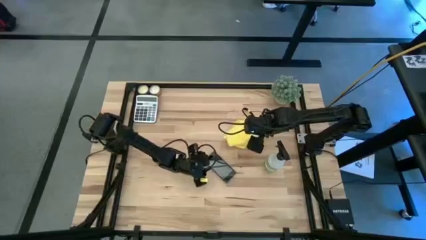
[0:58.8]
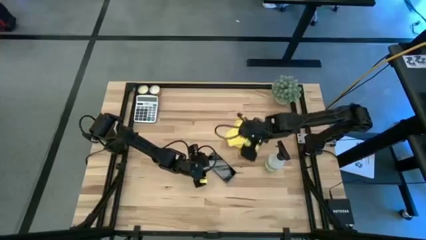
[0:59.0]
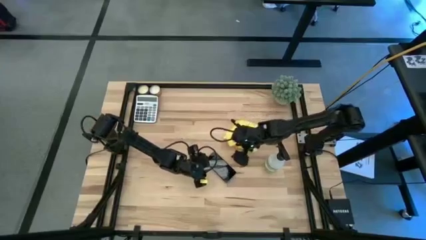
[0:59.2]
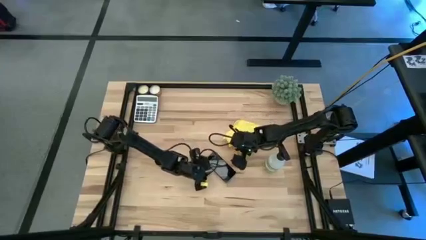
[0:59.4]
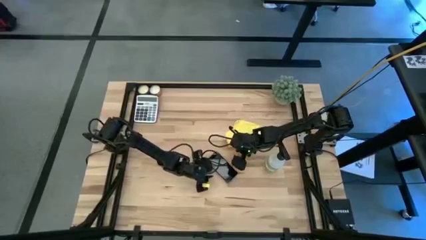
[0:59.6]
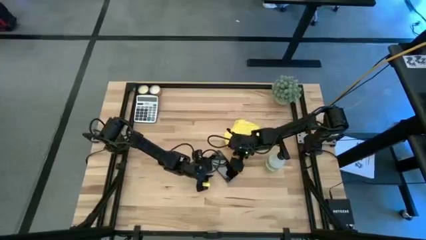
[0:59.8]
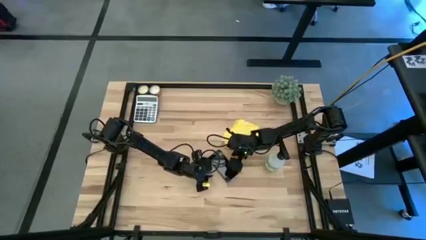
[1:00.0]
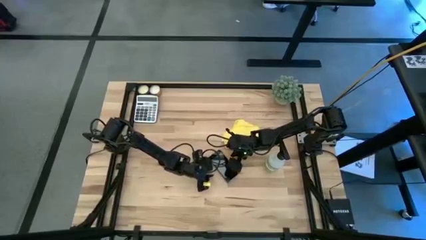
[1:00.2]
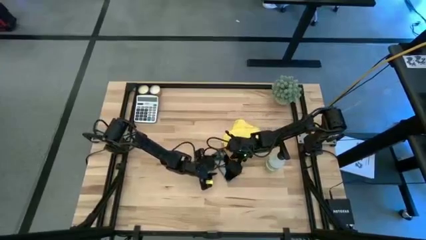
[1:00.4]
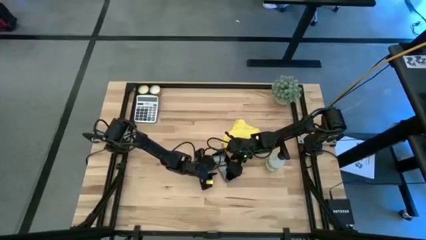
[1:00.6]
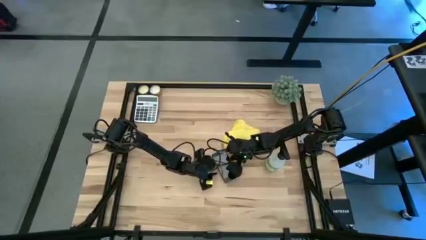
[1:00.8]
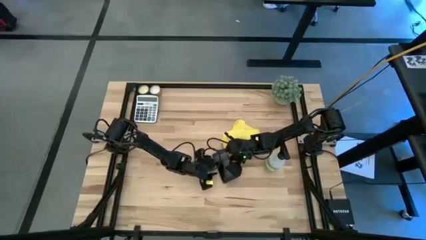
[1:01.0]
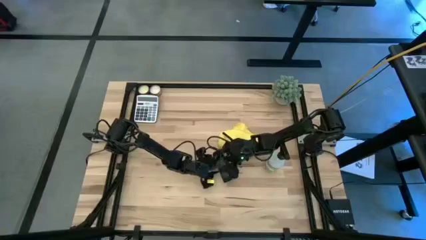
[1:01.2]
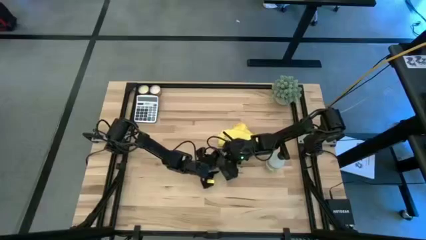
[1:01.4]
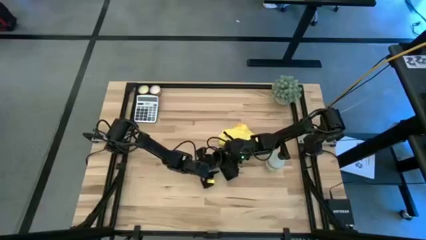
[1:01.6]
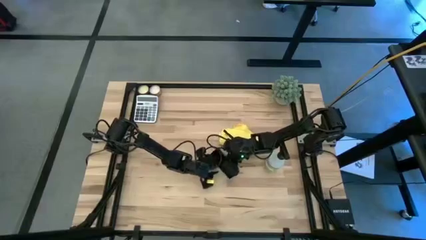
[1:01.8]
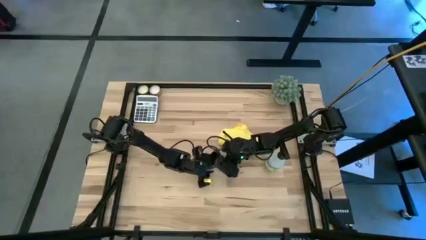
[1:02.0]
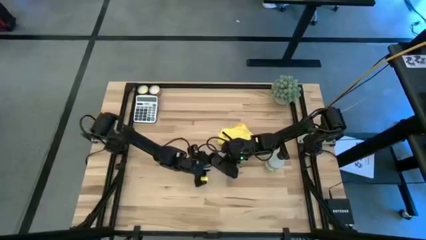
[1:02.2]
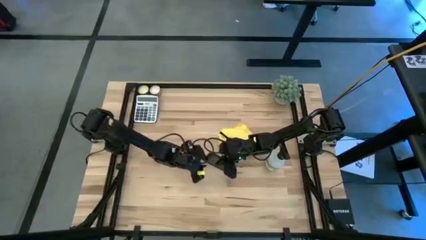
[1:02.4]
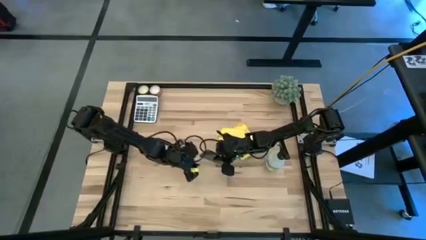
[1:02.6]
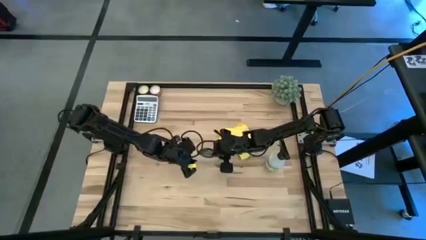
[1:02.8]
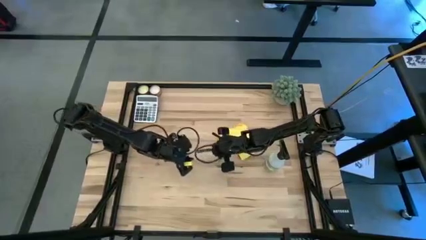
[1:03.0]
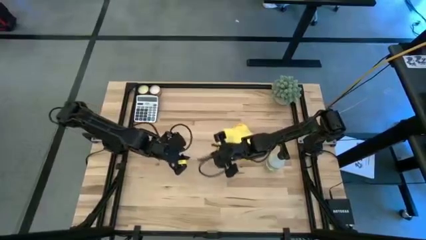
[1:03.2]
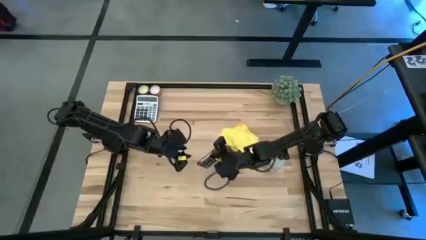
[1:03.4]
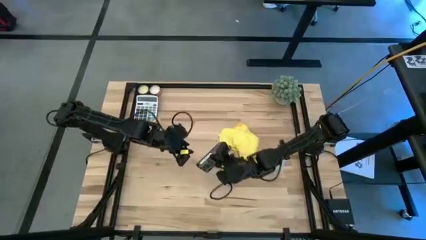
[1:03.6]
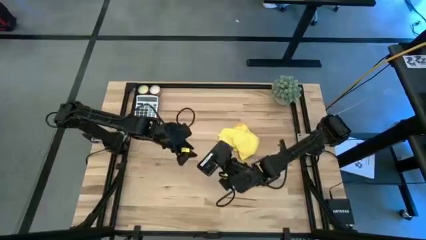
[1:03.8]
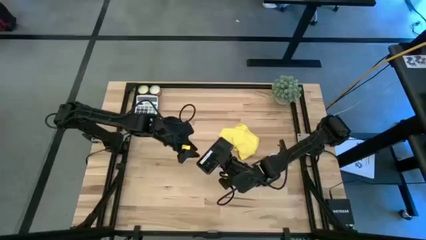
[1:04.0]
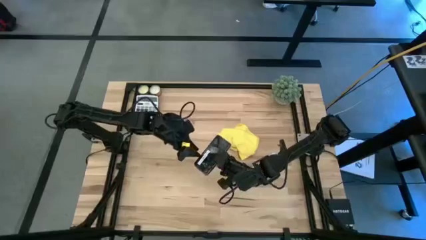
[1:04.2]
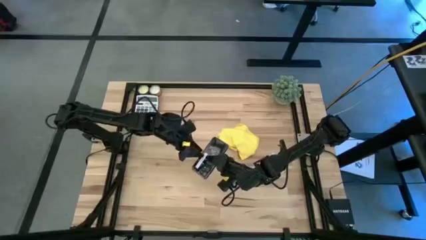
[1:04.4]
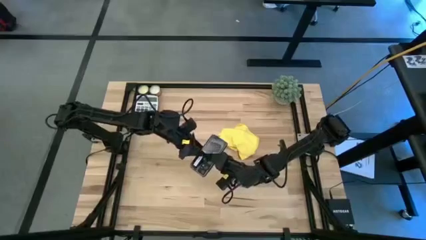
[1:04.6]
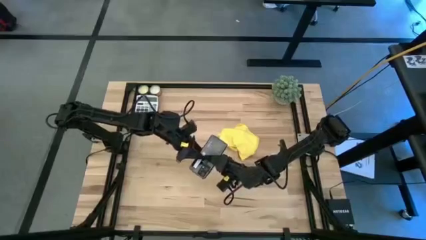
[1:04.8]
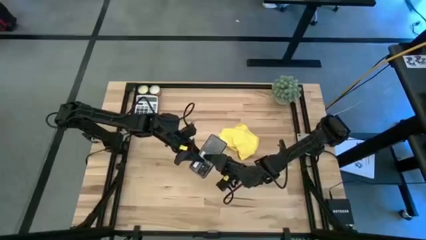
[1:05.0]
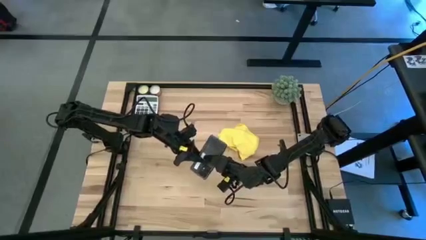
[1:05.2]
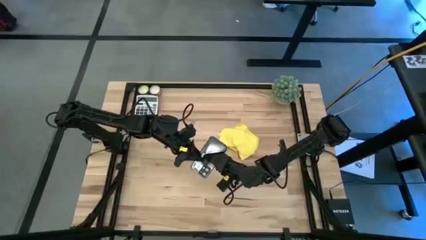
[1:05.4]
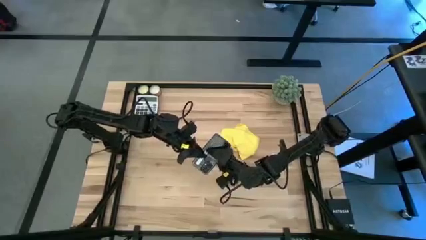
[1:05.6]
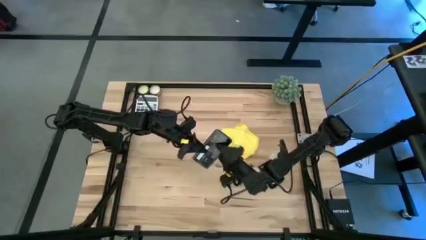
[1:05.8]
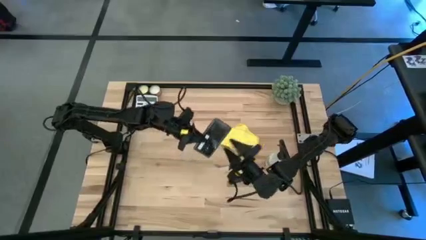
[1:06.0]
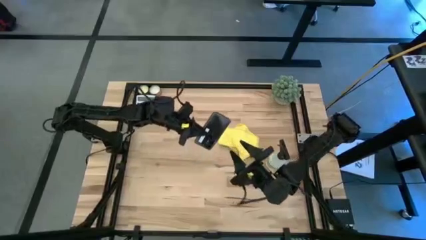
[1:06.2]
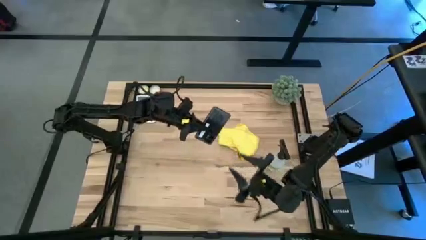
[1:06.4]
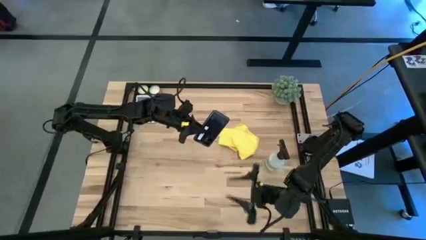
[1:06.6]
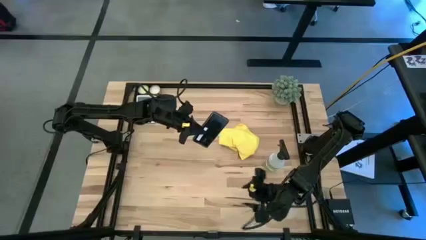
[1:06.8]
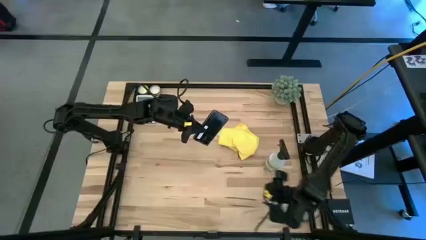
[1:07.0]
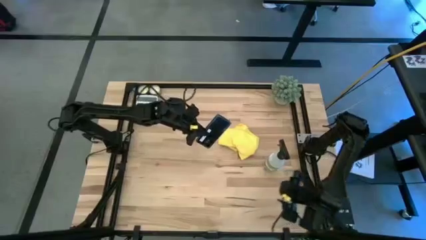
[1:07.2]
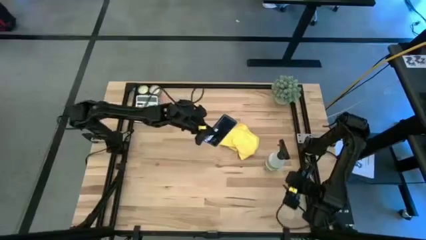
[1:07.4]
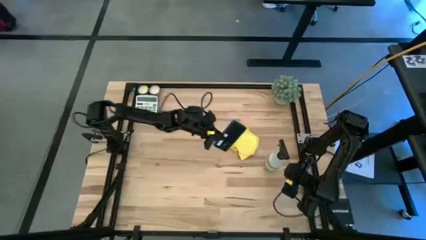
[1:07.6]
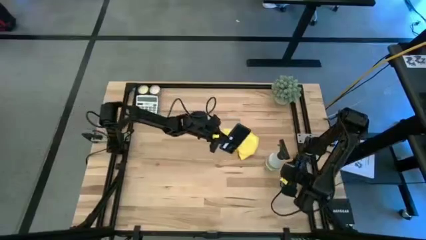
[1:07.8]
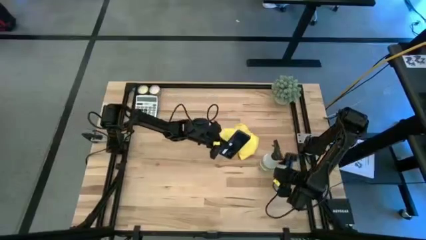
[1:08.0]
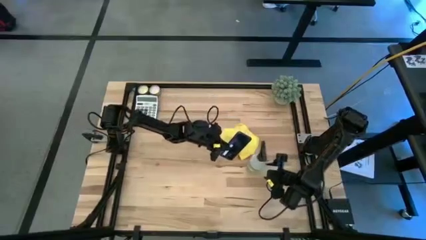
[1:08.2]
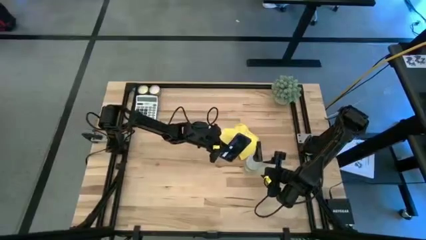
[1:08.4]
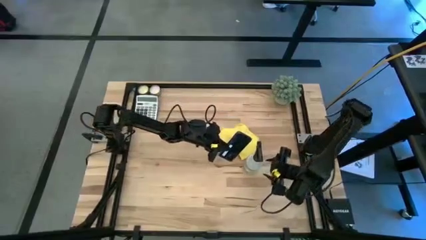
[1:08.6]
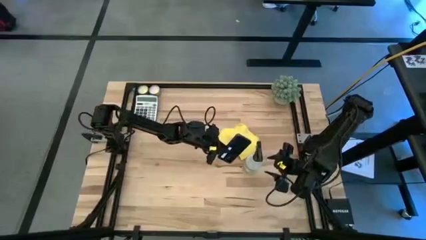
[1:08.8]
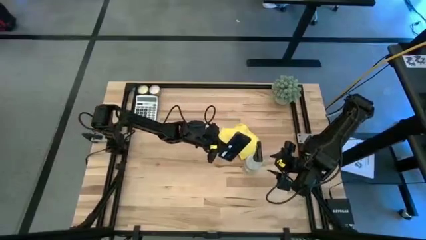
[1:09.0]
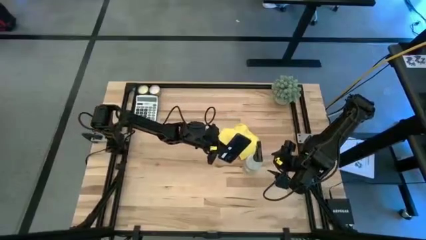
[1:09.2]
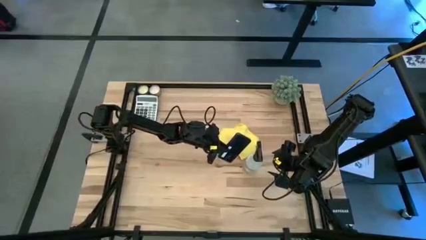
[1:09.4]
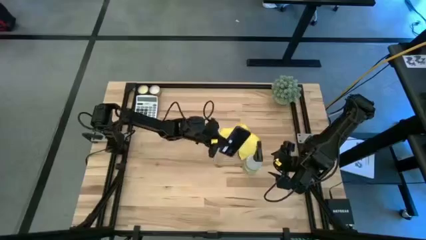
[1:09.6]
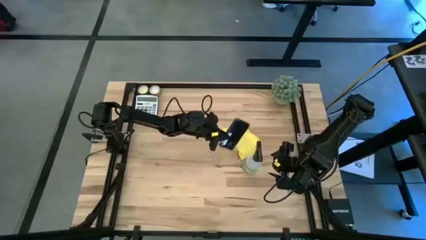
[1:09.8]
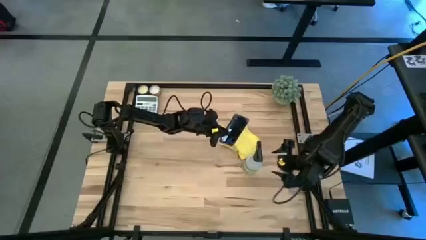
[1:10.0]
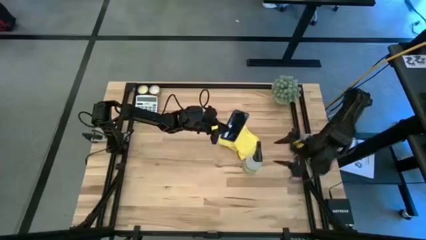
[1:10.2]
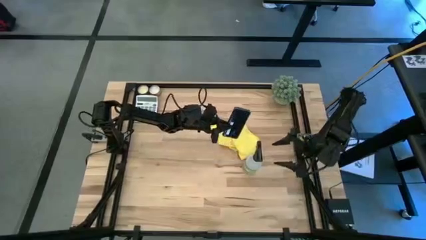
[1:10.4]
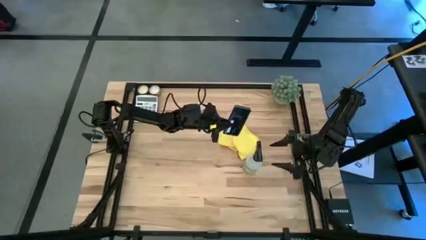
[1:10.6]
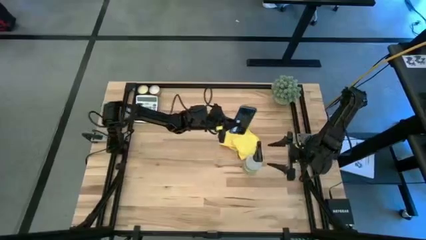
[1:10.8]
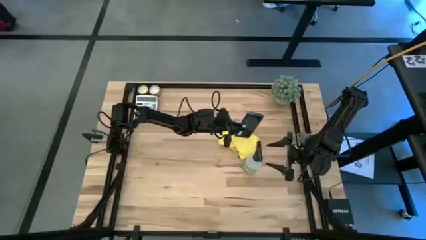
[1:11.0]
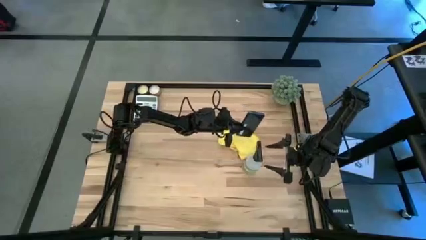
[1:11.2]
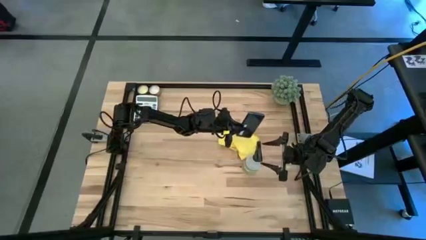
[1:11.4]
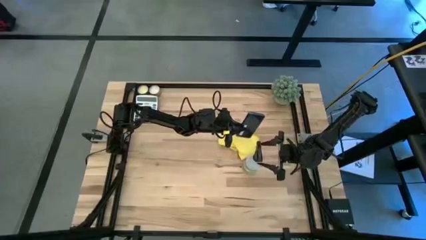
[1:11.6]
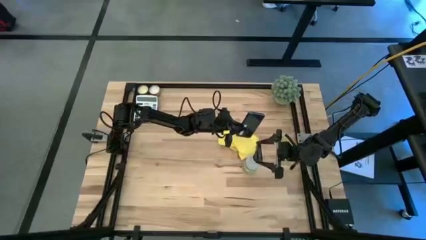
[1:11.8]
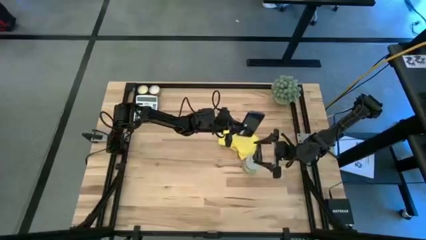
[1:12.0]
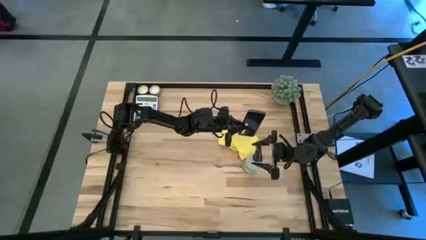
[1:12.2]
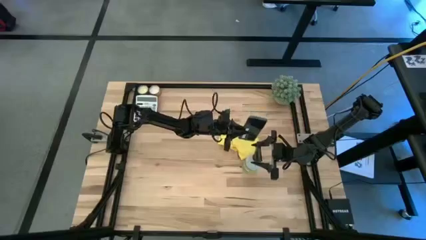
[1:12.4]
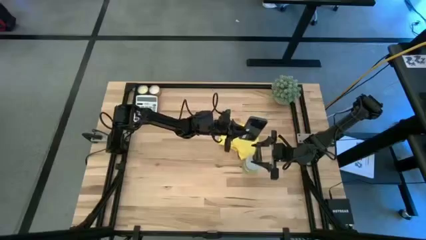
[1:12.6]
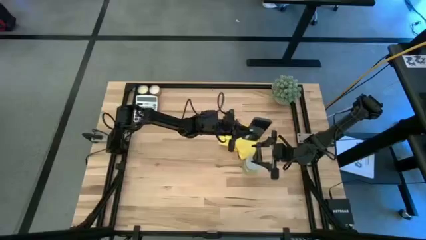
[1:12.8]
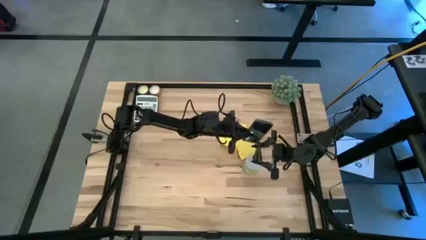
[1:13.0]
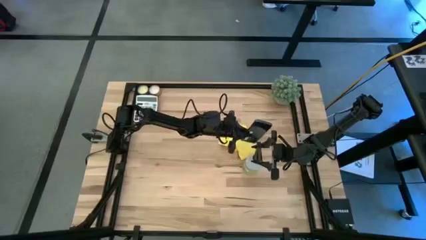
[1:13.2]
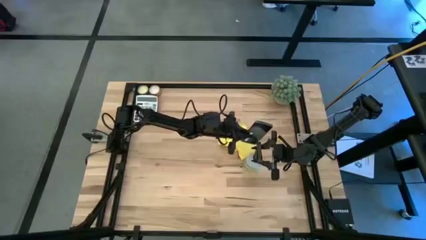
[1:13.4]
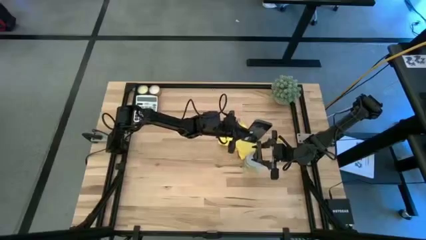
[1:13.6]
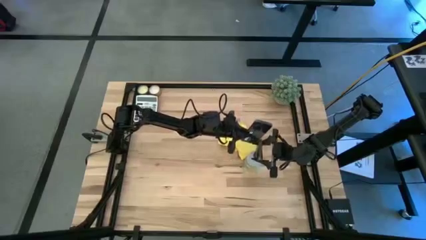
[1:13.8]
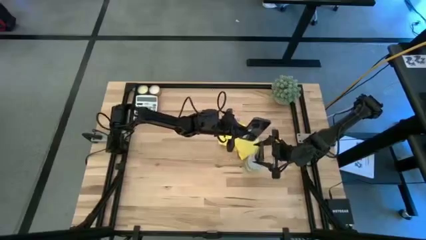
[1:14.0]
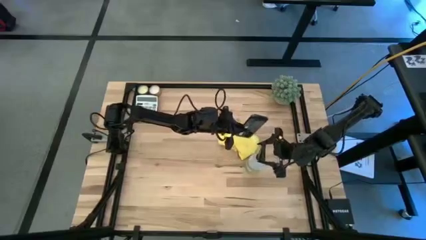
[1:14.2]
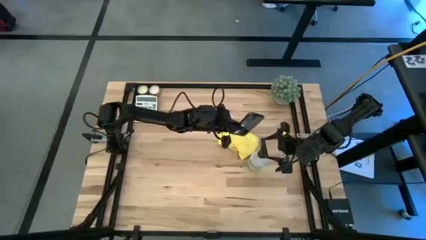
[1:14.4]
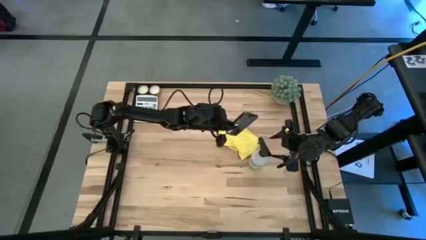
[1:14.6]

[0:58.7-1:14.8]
Task: Apply microfiber cloth
Spray the back of the black cellphone using the white spray bottle
